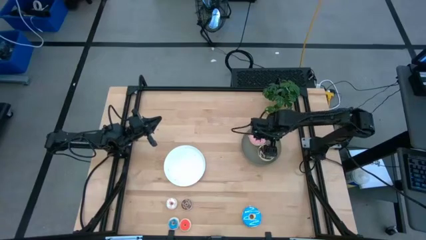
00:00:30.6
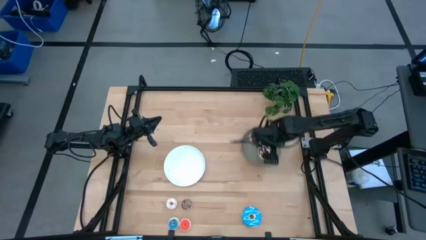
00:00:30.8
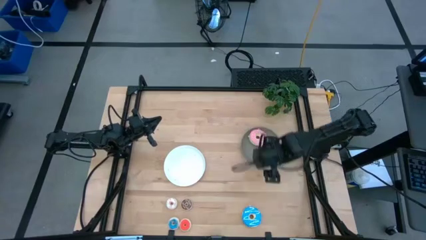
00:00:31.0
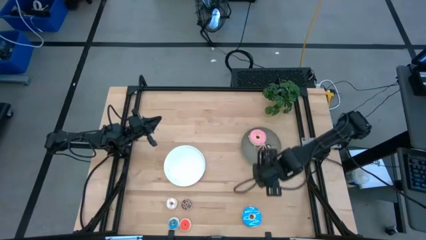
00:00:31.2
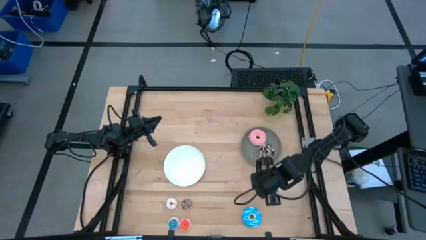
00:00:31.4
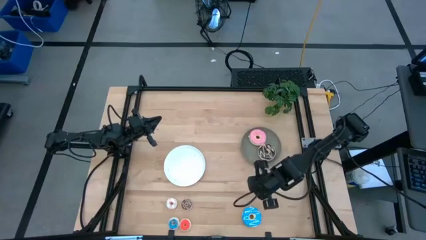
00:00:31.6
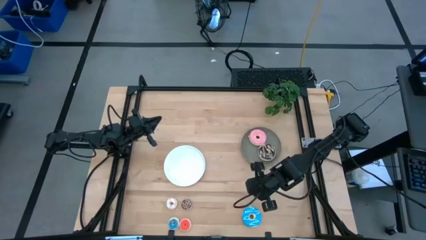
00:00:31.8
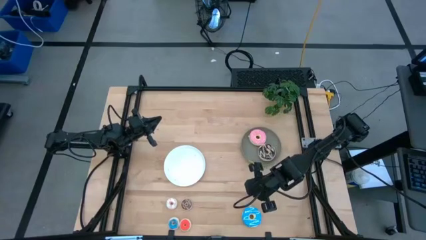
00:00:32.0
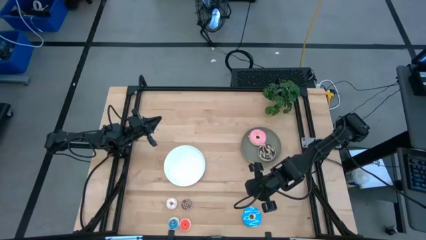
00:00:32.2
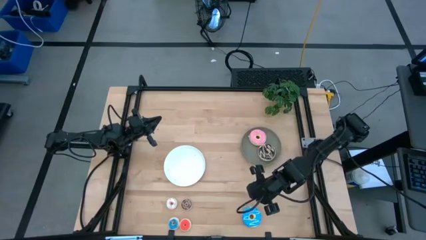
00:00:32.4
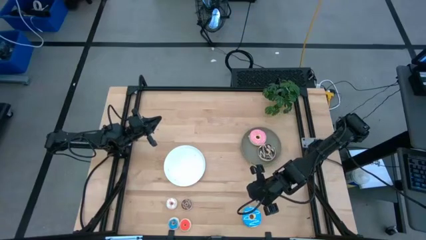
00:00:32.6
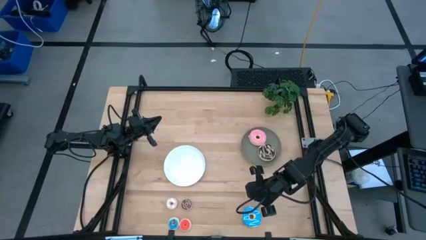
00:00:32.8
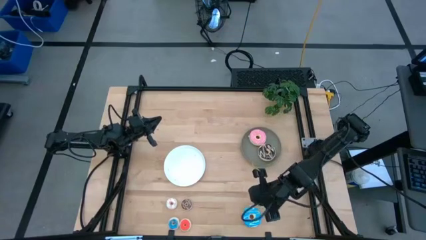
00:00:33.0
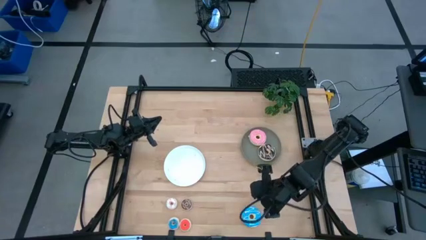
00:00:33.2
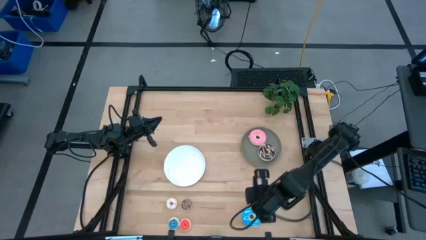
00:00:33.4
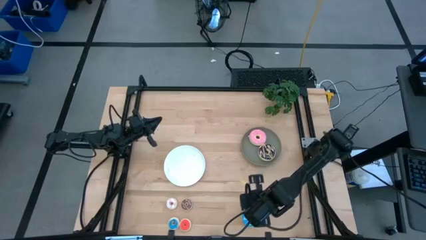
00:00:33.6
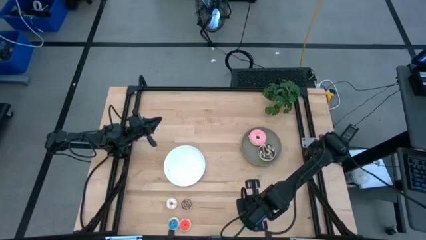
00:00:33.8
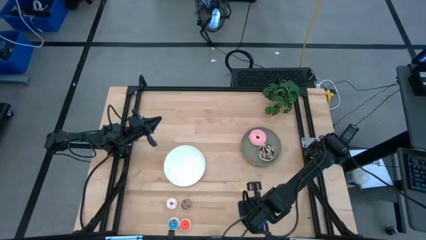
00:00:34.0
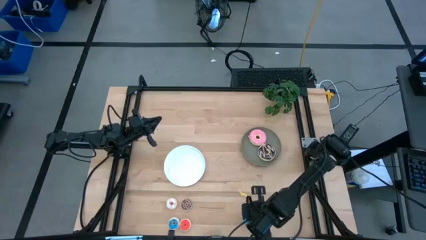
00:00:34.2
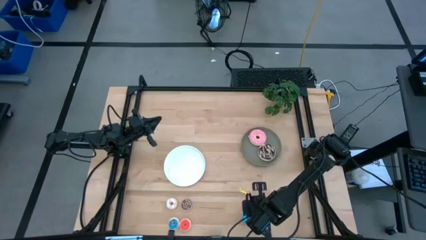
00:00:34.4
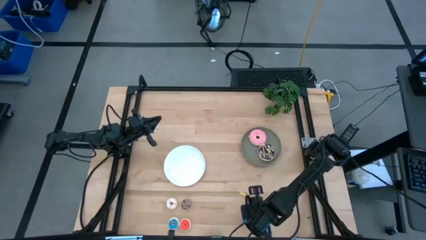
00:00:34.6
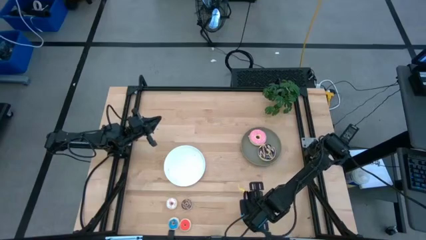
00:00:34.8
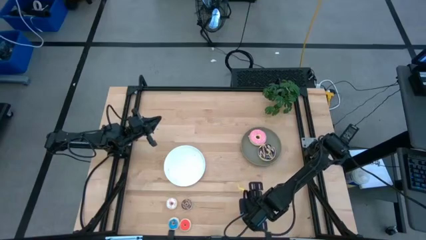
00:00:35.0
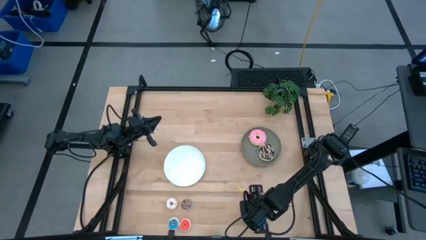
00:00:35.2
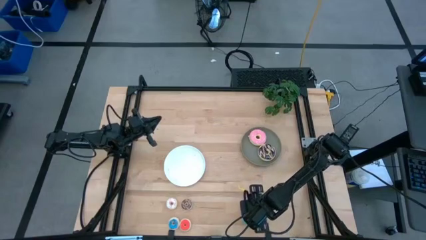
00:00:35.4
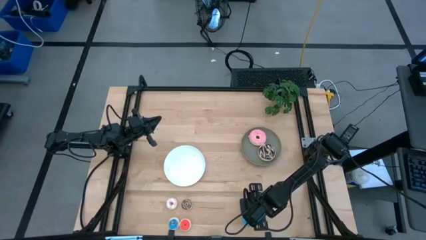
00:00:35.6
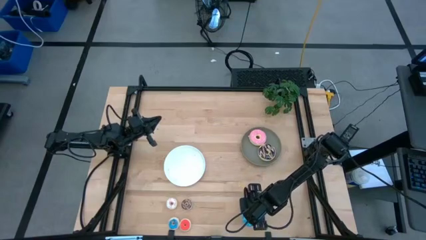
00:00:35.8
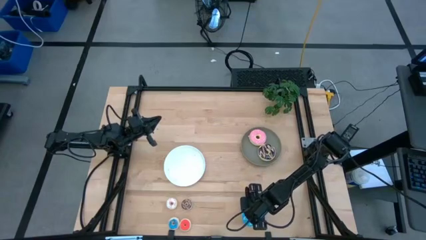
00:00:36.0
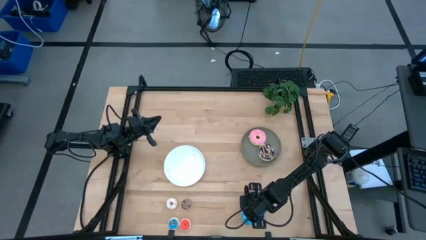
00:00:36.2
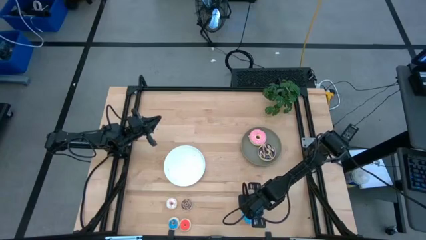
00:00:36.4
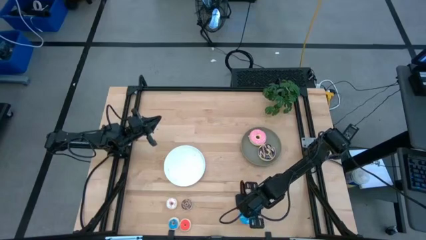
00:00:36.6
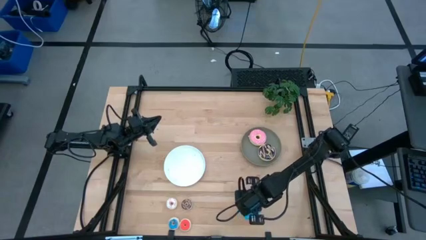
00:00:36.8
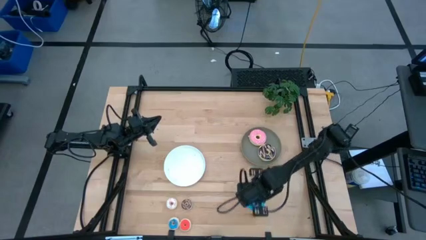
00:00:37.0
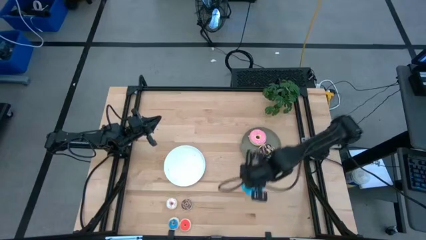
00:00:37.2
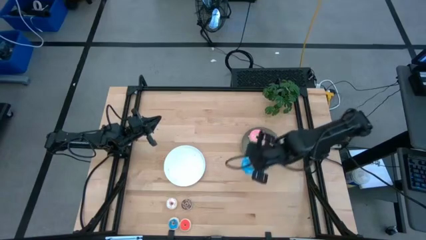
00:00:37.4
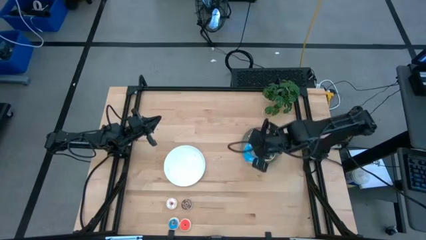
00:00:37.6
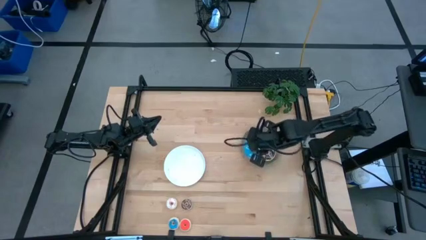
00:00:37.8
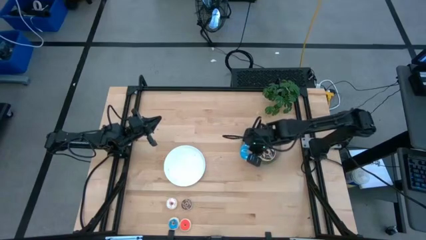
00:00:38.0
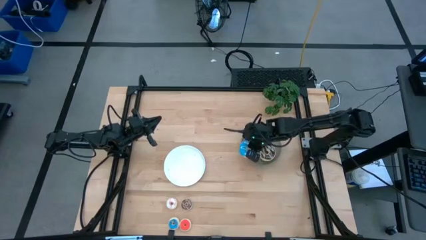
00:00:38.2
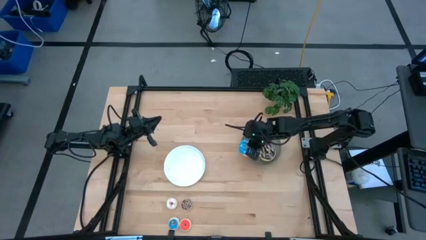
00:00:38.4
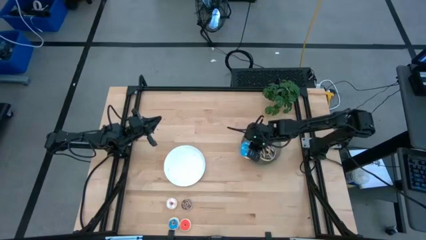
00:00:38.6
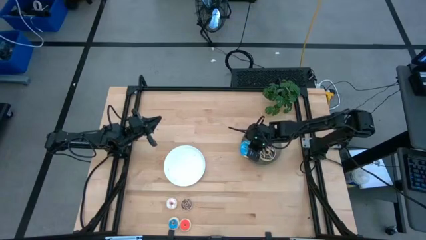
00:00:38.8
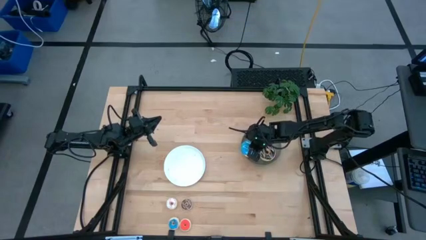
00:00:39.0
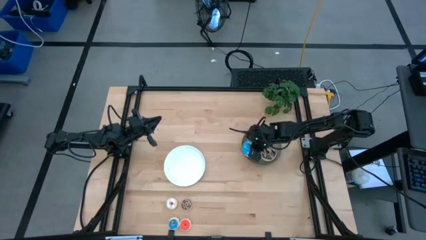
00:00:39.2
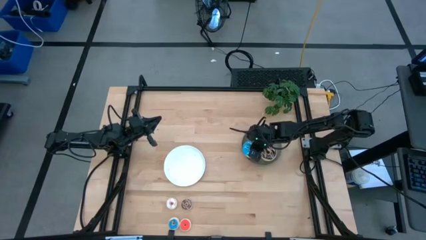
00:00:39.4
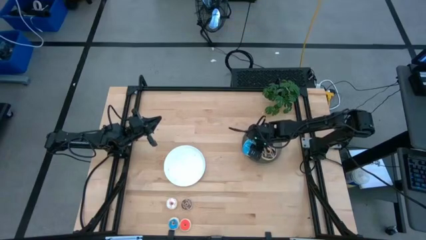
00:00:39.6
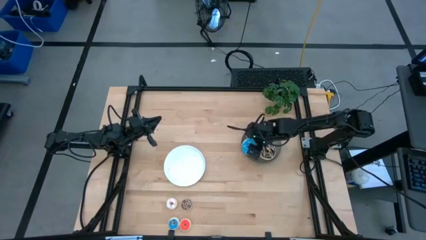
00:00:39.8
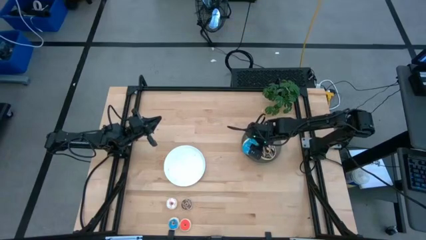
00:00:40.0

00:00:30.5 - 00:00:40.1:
Task: Pick & Place donuts
Put the big blue donut on the gray plate

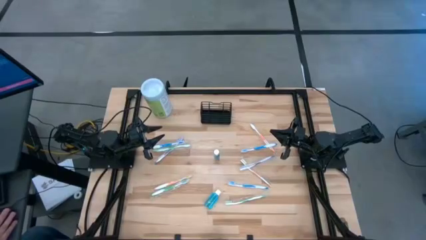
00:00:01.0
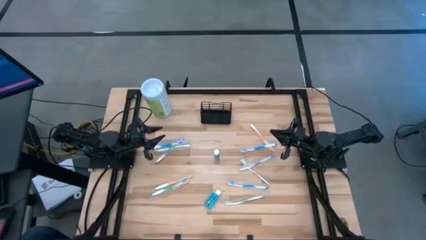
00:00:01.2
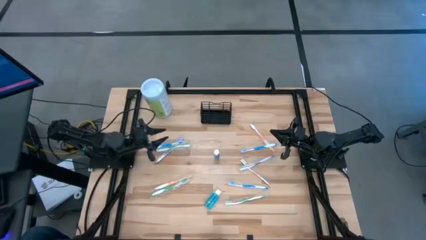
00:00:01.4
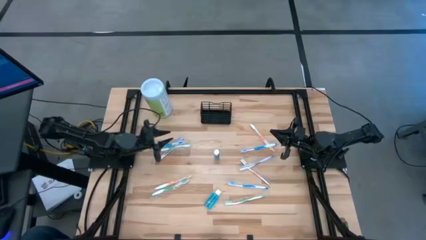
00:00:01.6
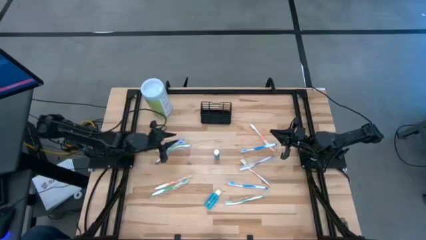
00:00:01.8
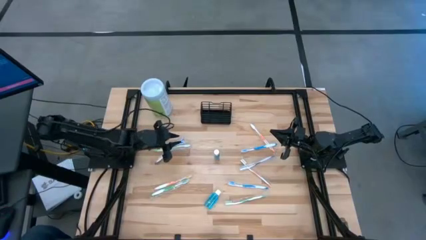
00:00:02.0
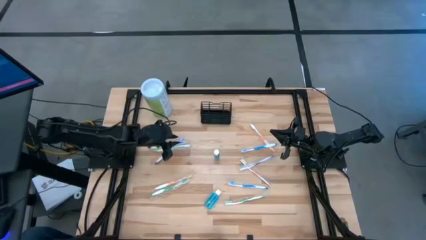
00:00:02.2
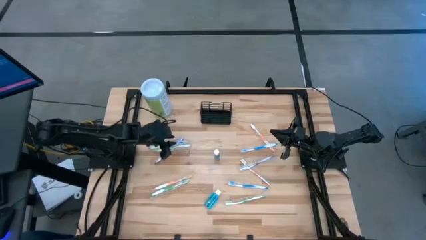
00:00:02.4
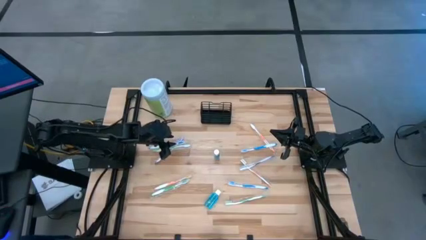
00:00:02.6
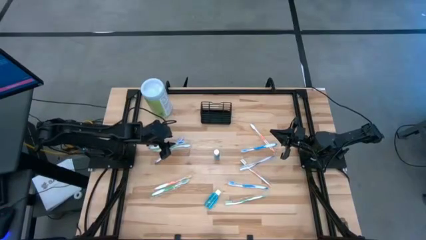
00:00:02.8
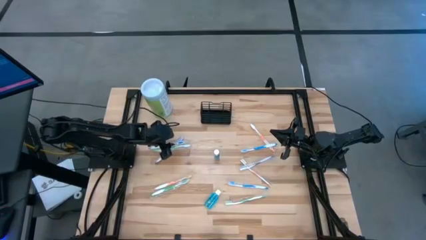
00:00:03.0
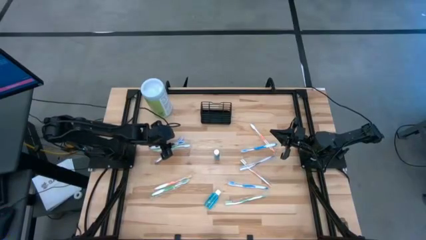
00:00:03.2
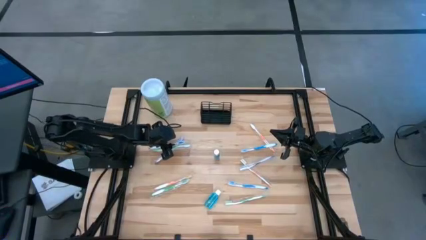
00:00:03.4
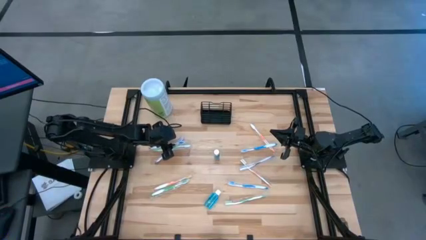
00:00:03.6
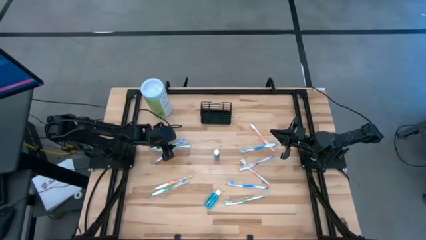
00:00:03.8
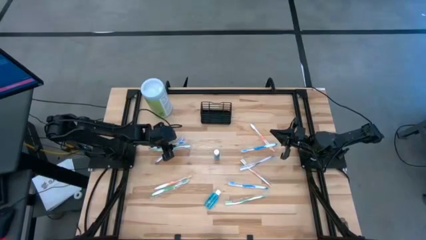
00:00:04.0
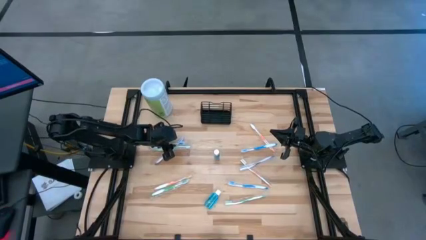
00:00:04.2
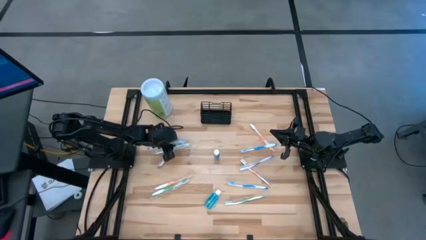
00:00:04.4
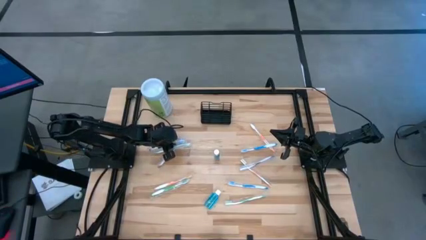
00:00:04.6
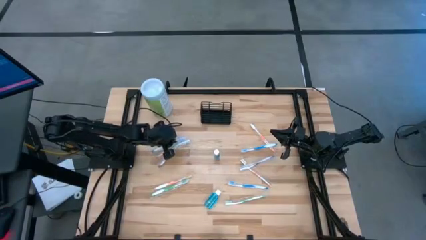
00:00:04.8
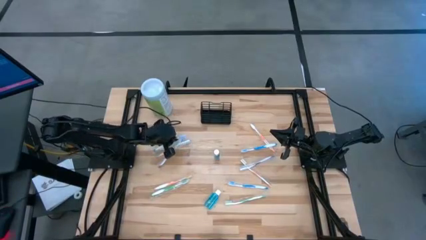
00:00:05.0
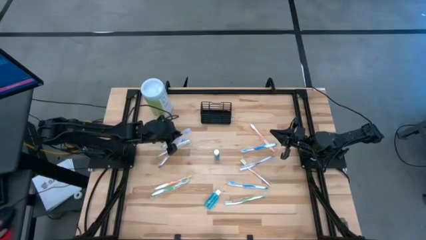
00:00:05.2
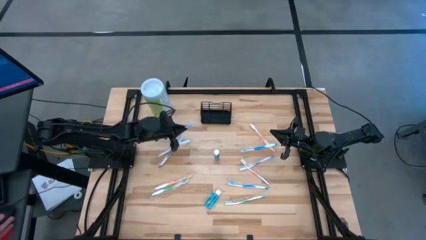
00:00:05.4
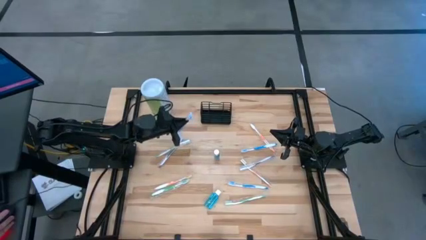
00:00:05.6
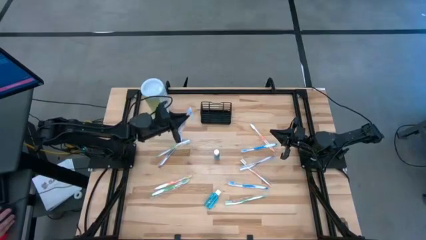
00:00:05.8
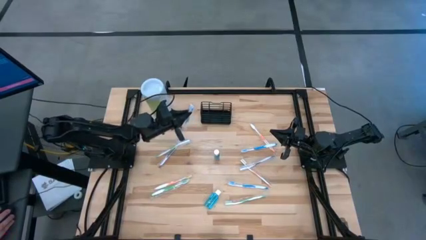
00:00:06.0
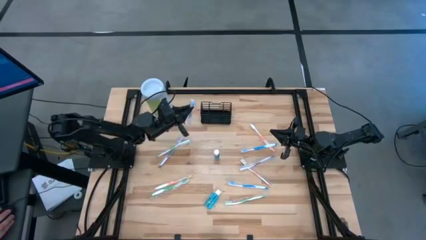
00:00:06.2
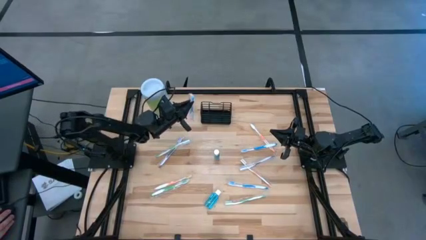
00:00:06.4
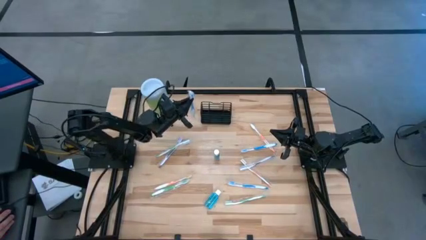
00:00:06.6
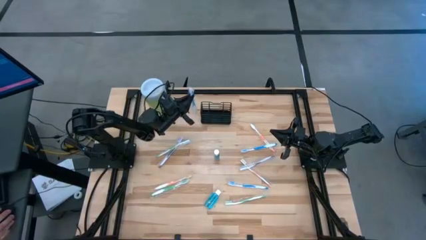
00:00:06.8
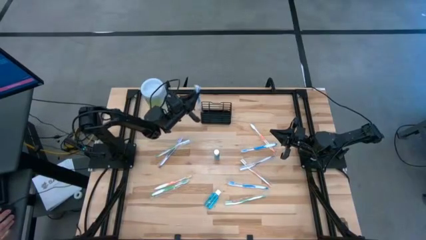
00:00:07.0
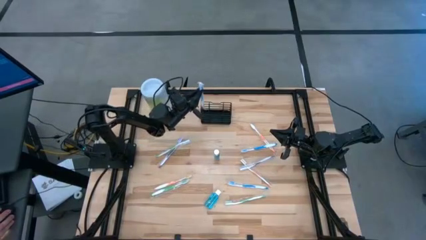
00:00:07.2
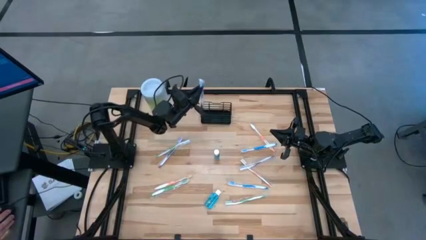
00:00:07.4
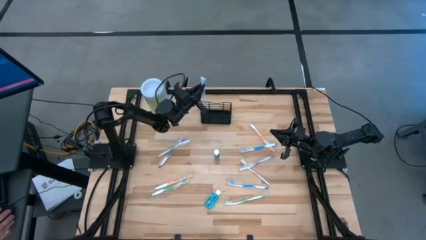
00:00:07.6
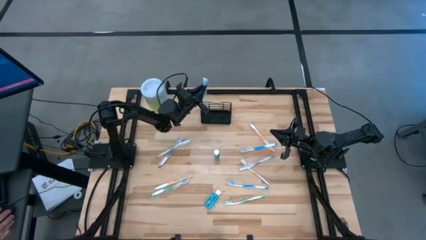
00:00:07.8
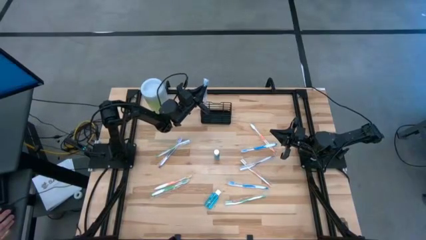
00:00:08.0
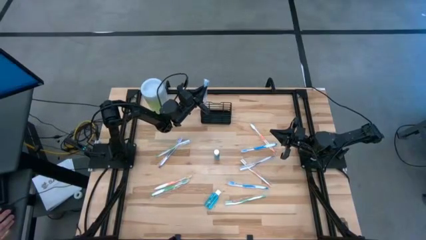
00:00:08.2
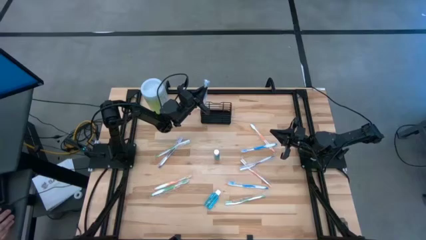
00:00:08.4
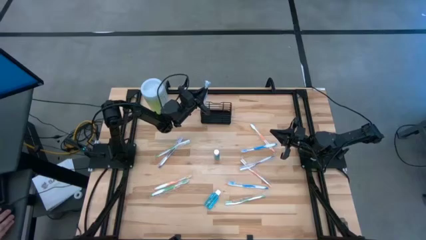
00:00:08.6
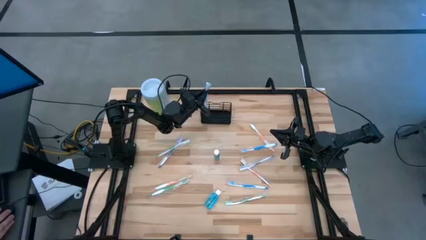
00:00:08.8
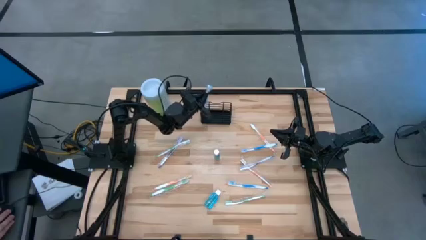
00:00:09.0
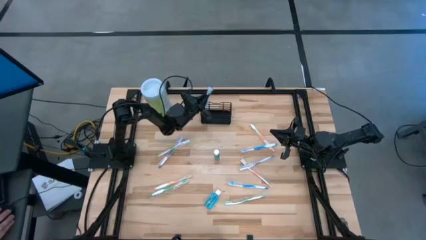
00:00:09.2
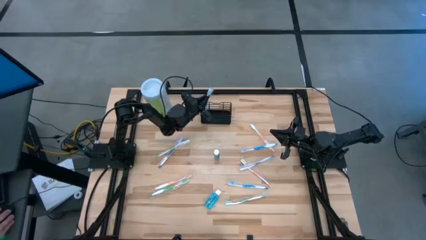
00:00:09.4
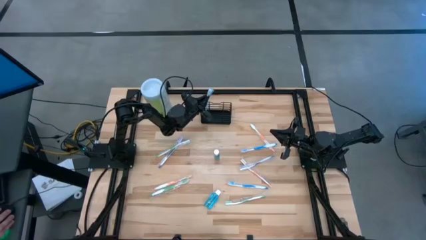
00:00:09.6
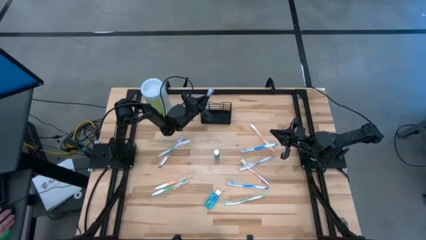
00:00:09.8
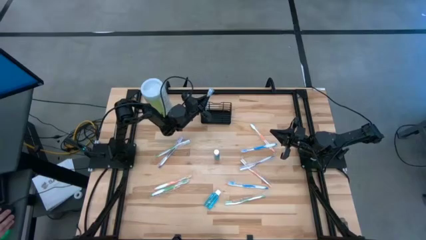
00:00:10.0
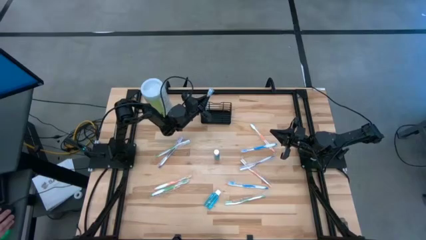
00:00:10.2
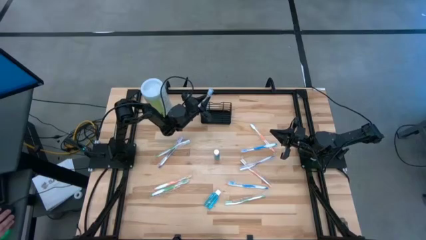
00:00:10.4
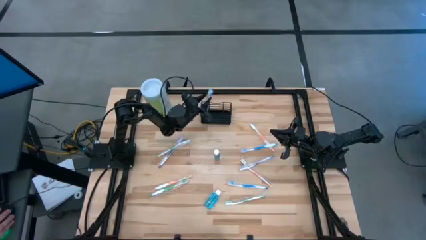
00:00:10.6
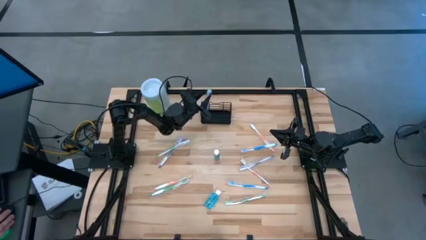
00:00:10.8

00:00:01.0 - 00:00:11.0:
Task: Pick & Place toothbrushing station
Put the blue toothbrush into the black wire organizer
